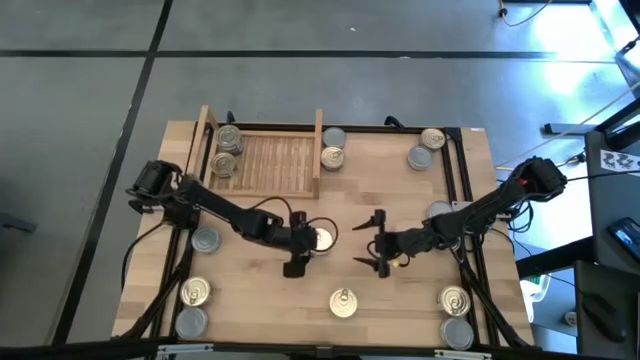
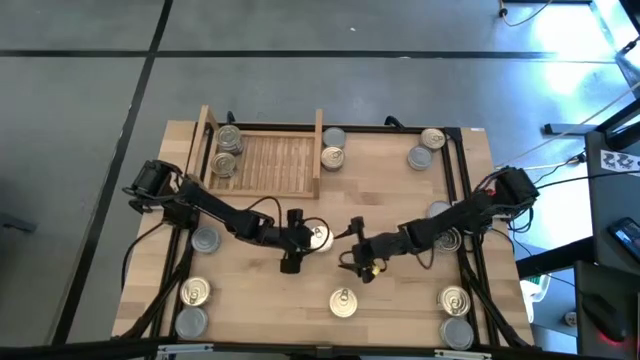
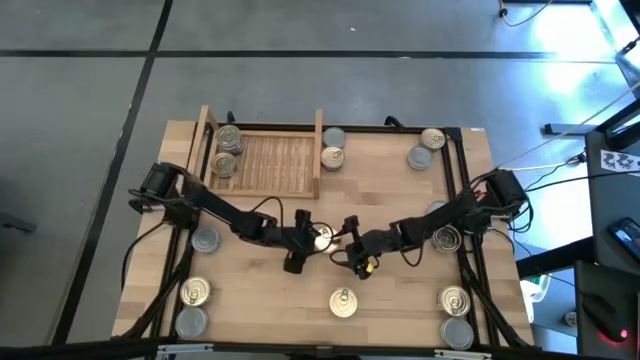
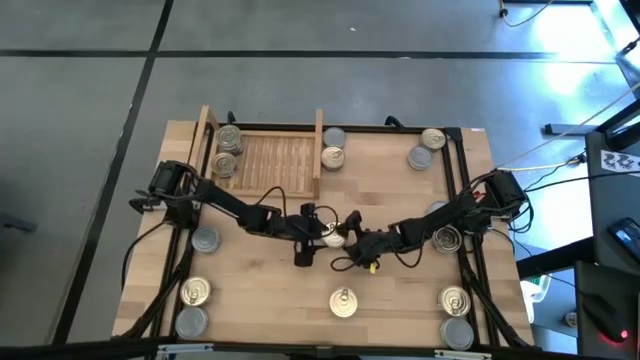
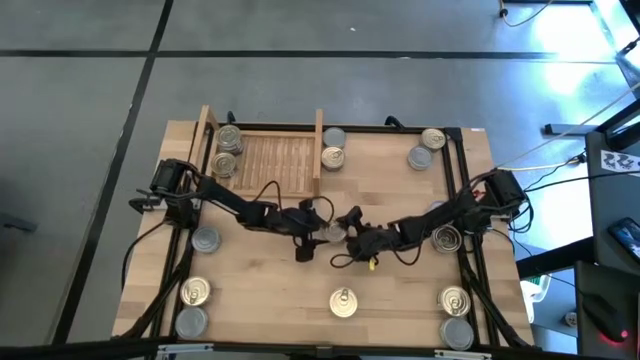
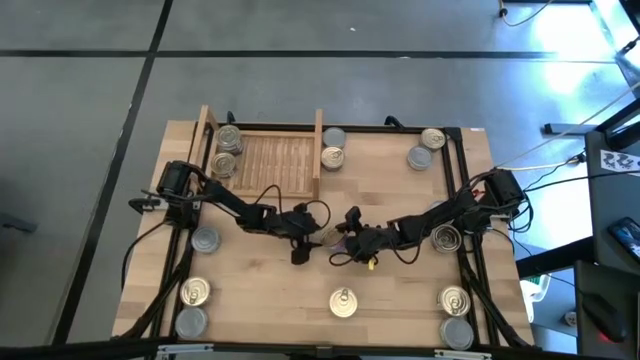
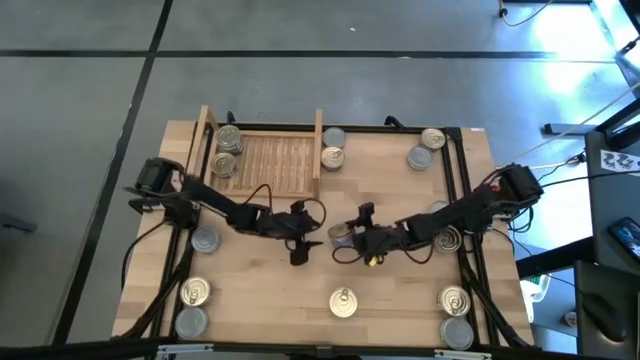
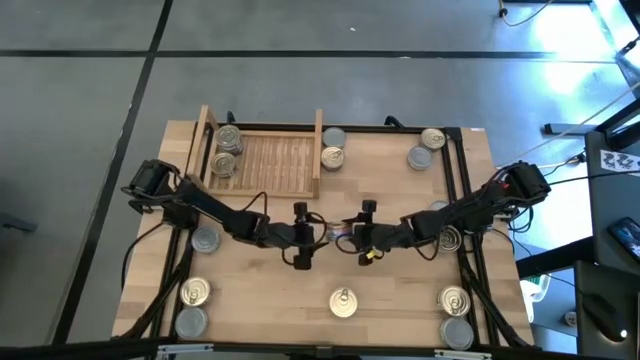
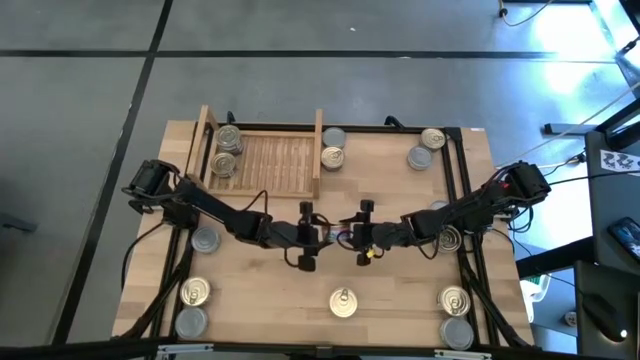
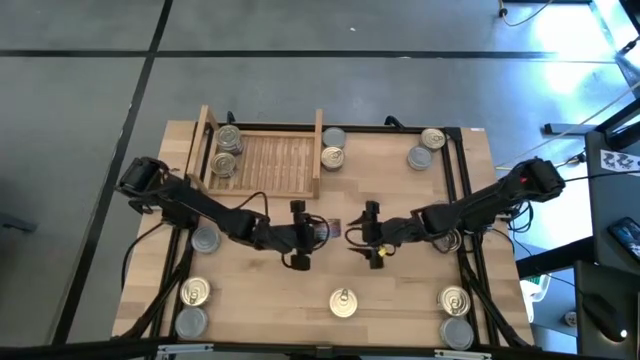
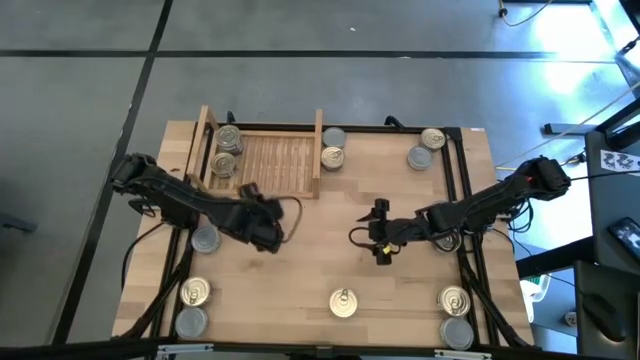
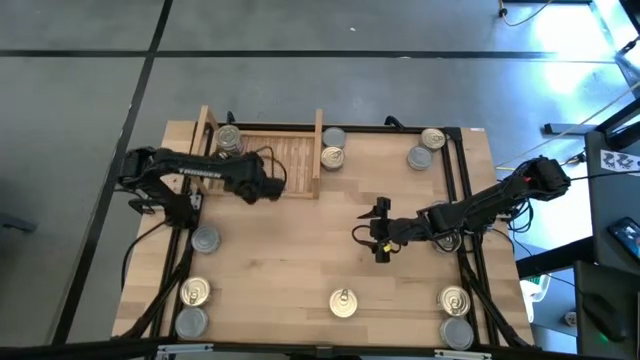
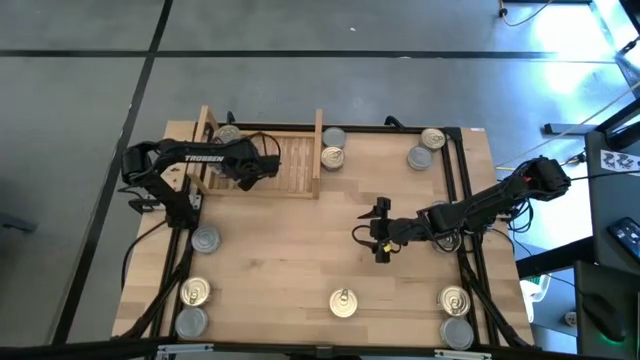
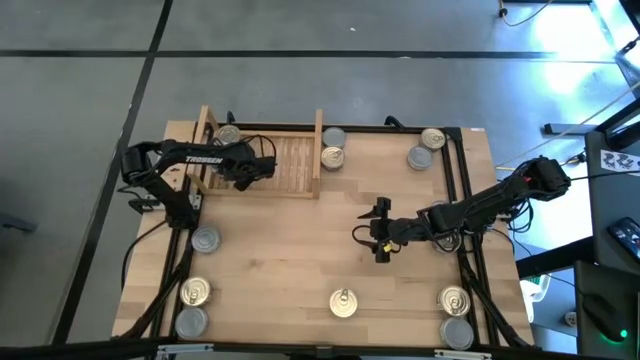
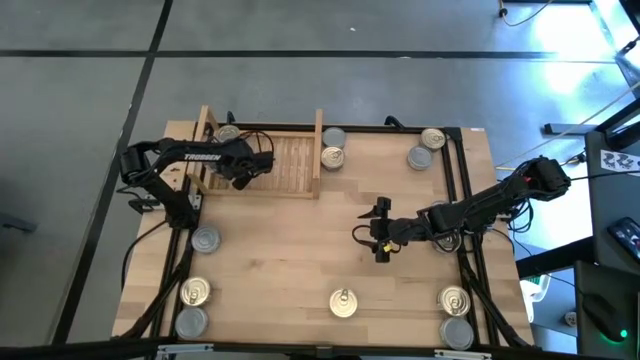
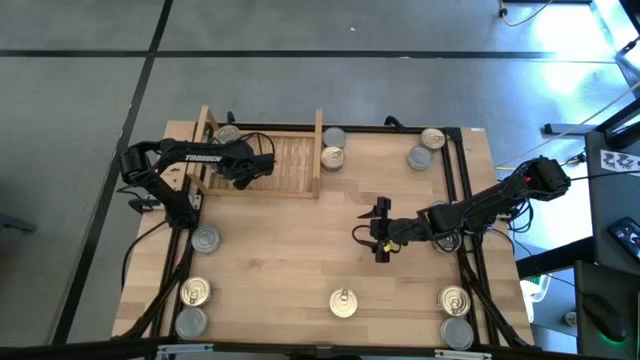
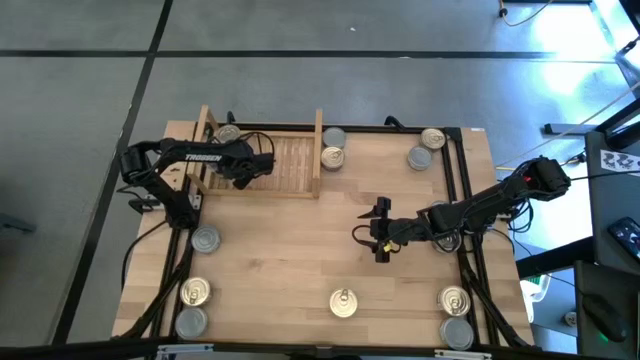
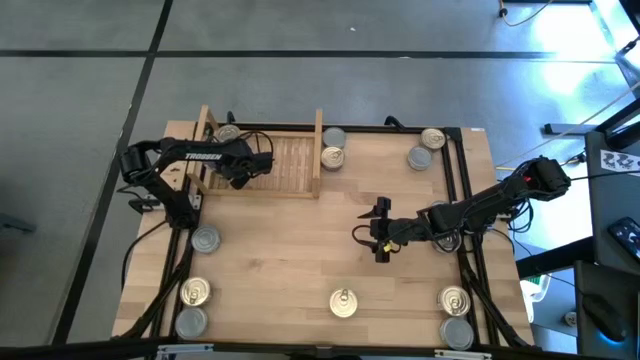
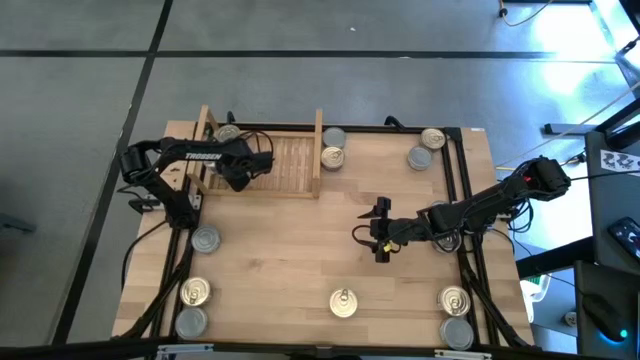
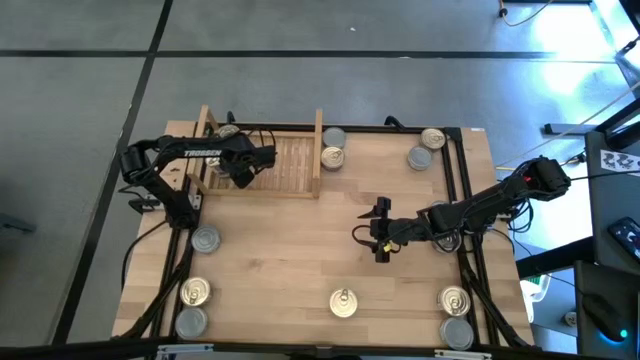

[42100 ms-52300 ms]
Task: Stack canned seafood by type on shelf
Stack the blue tuna can on top of the other blue tuna can on the shelf

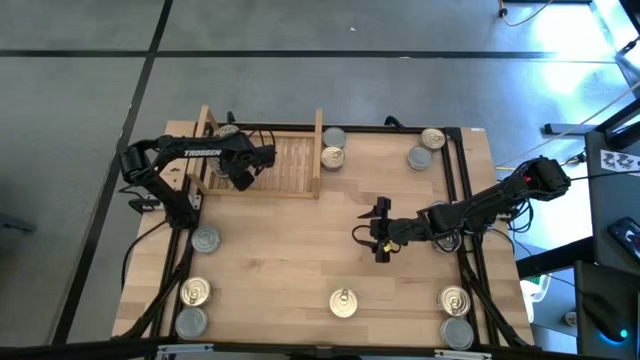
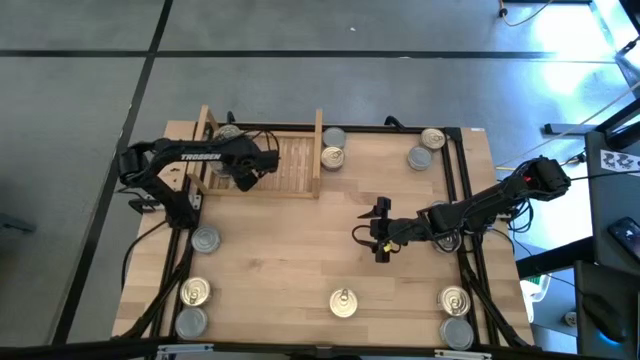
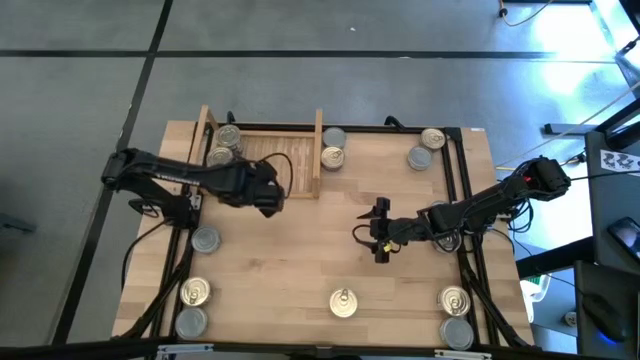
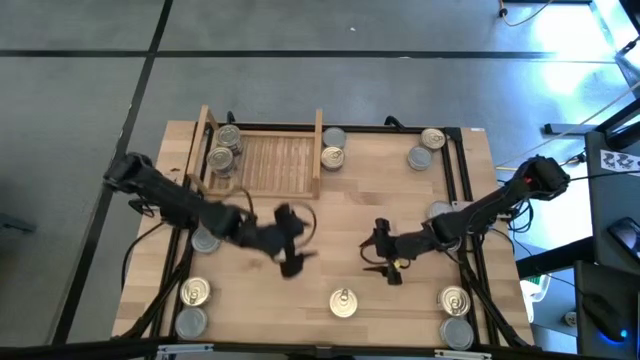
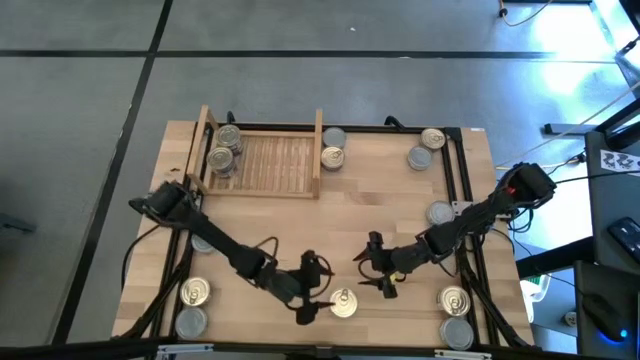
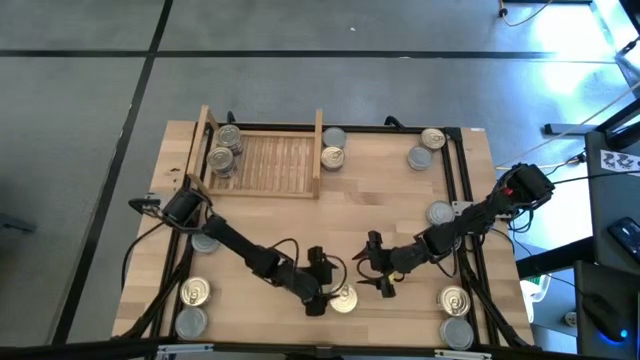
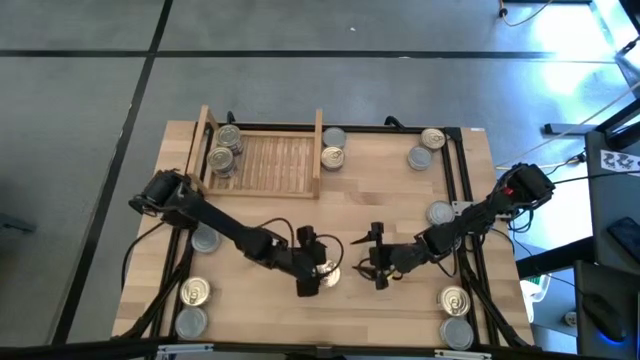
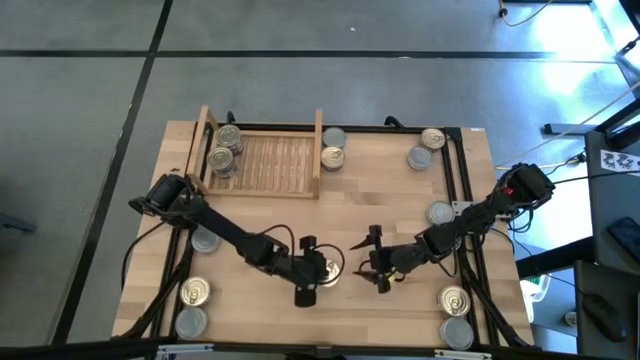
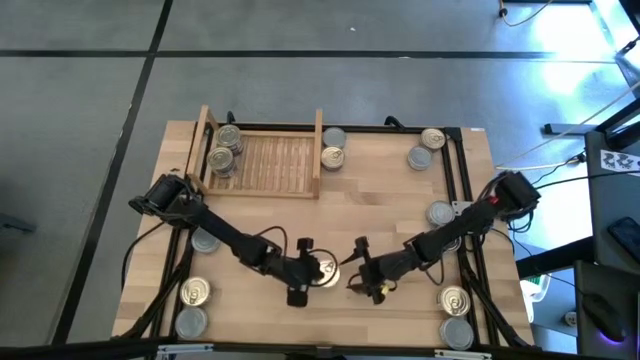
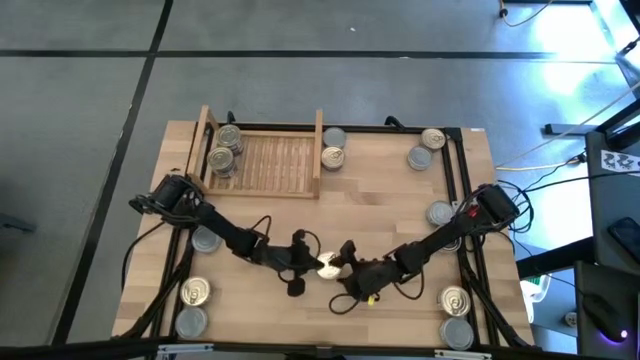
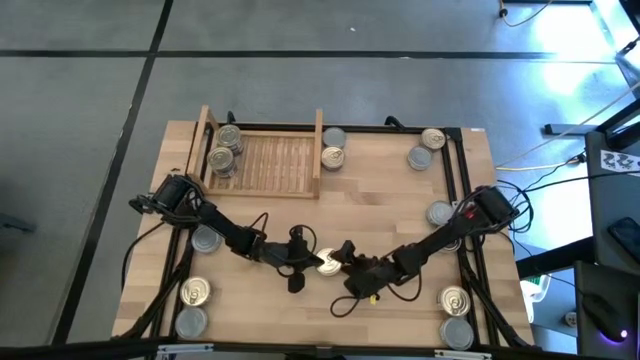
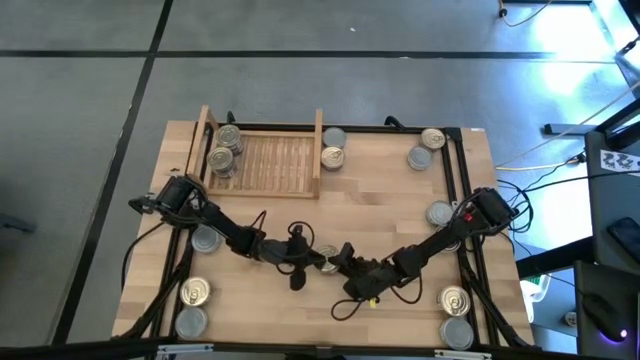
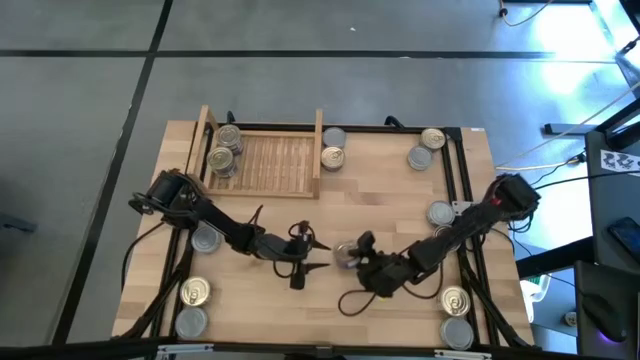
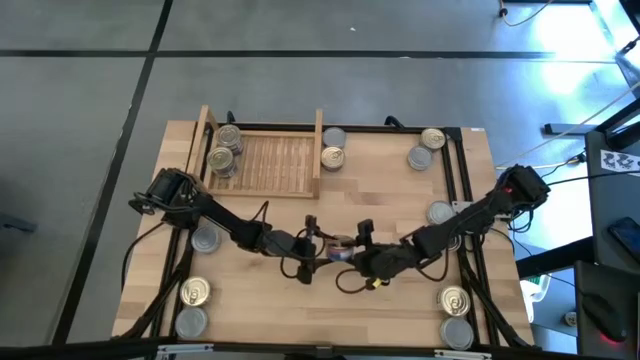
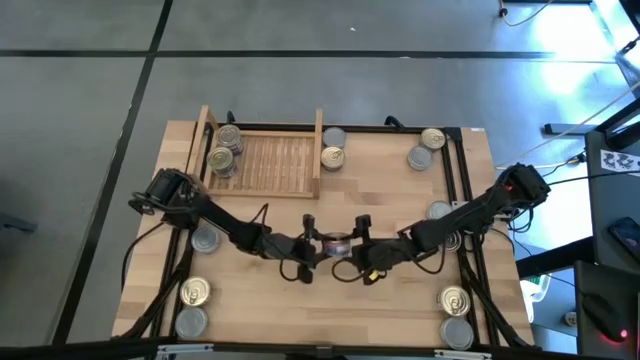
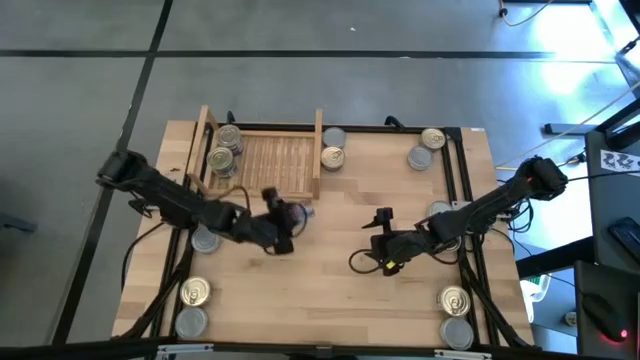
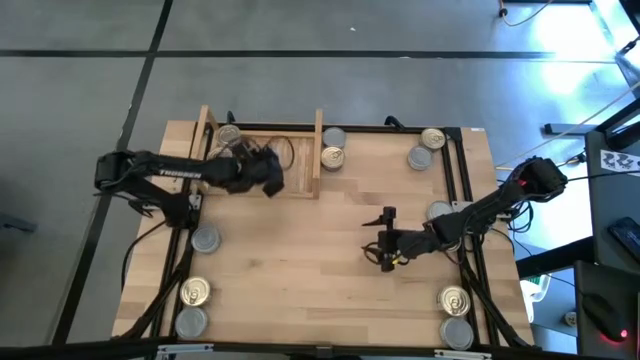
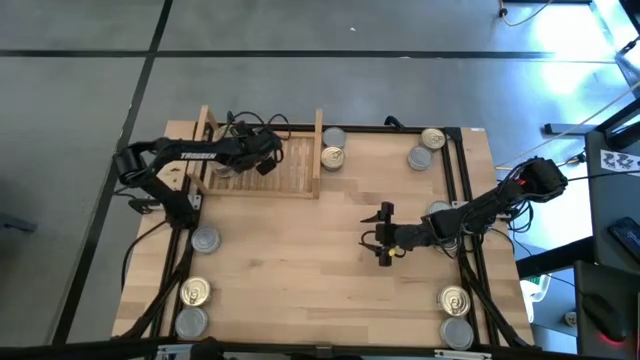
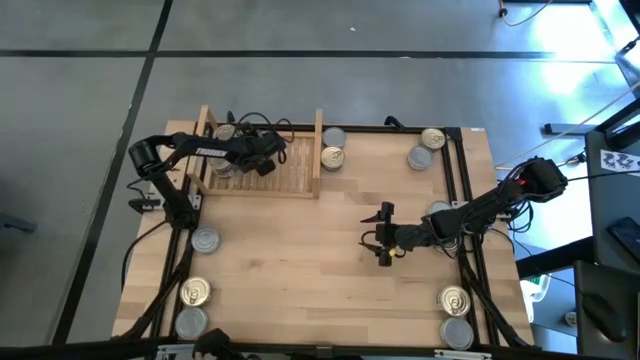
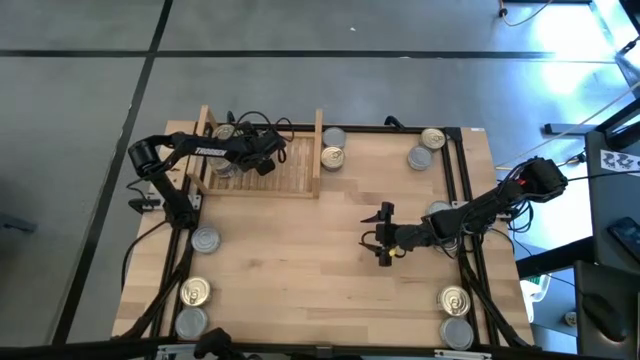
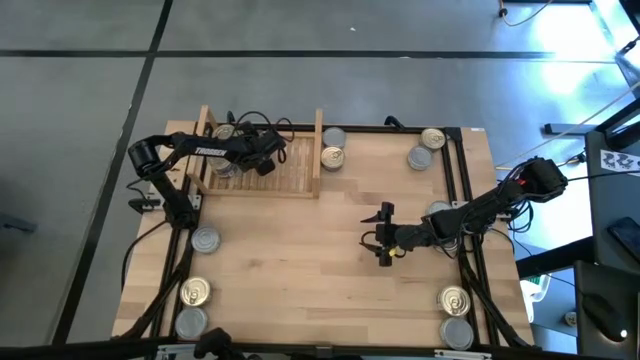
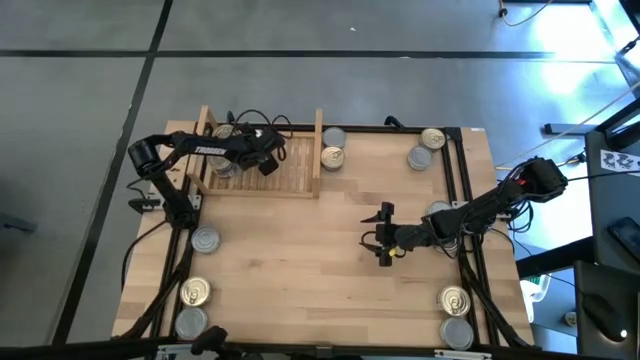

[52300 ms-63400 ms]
Put the blue tuna can on the shelf
